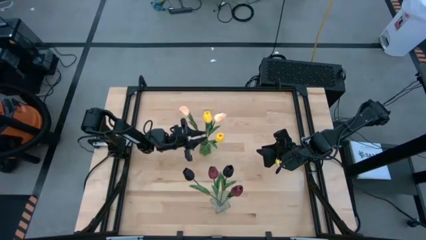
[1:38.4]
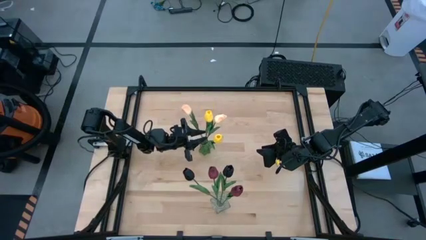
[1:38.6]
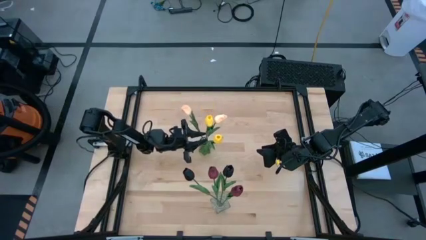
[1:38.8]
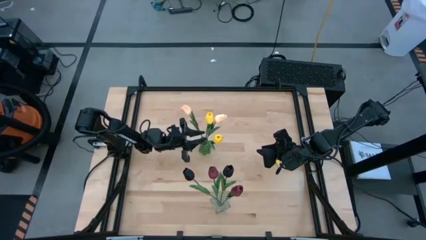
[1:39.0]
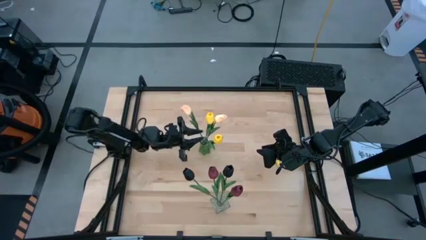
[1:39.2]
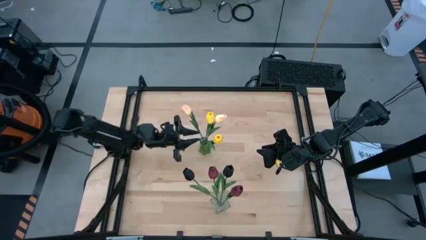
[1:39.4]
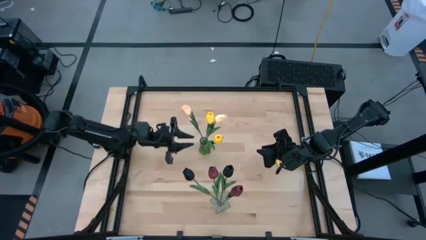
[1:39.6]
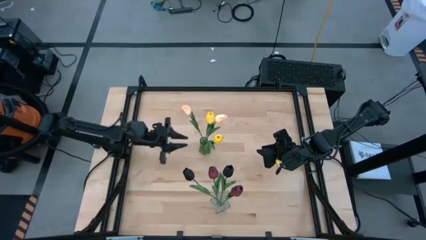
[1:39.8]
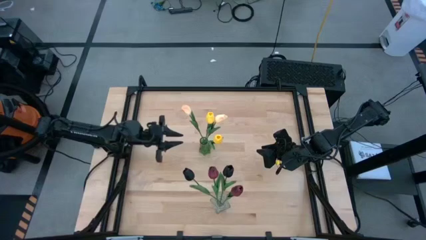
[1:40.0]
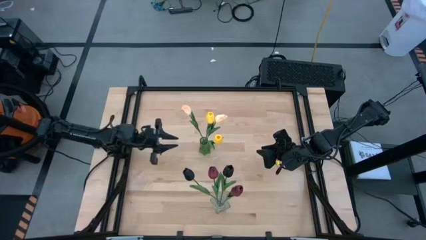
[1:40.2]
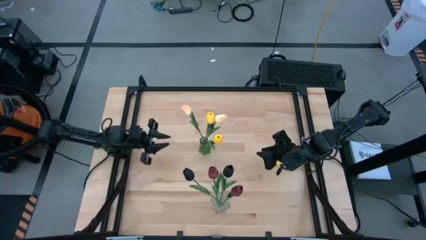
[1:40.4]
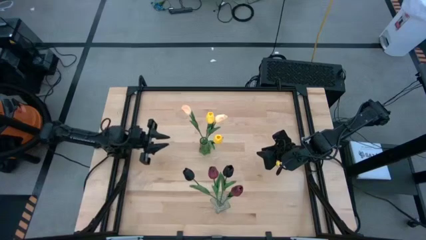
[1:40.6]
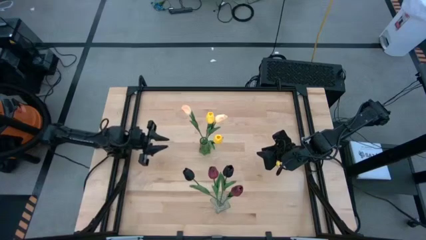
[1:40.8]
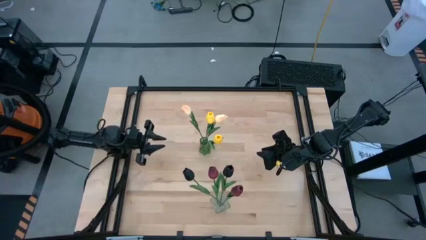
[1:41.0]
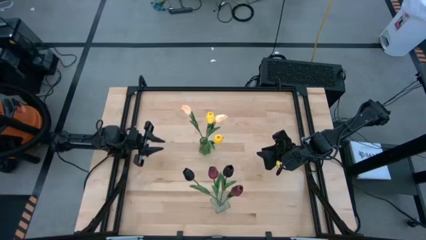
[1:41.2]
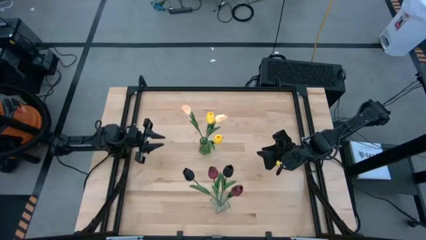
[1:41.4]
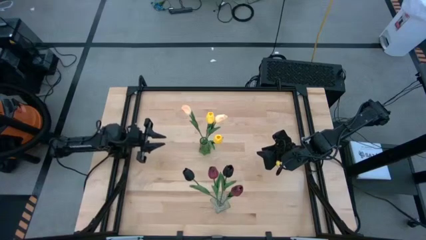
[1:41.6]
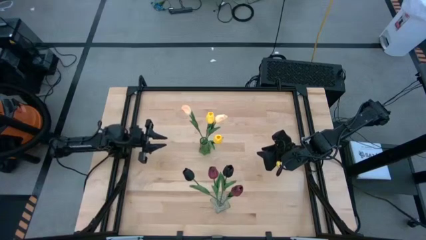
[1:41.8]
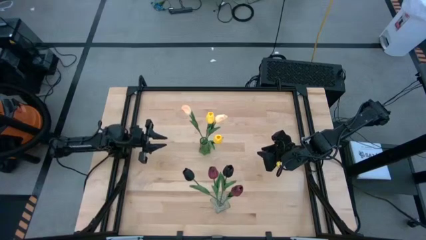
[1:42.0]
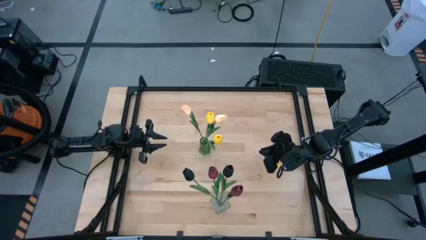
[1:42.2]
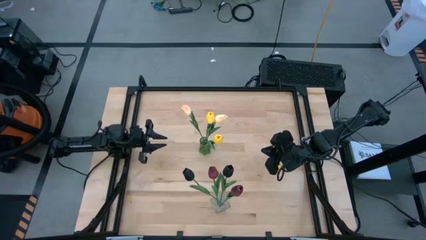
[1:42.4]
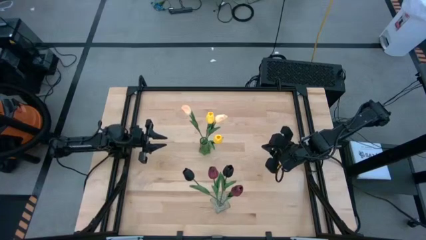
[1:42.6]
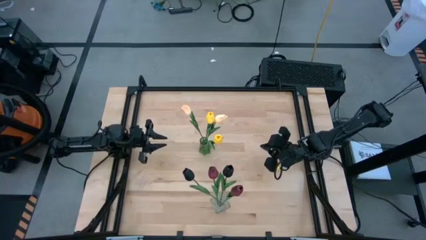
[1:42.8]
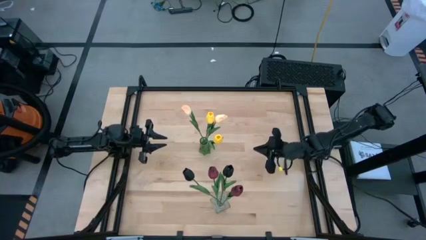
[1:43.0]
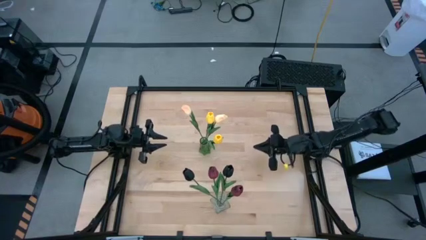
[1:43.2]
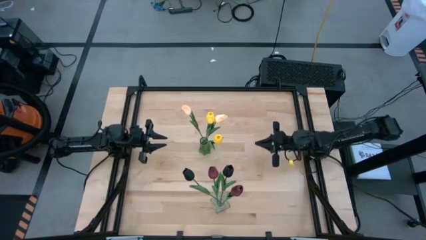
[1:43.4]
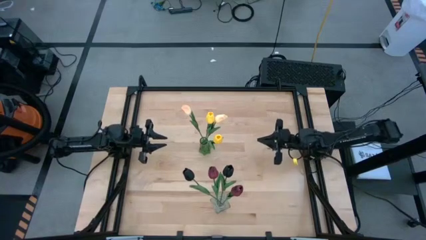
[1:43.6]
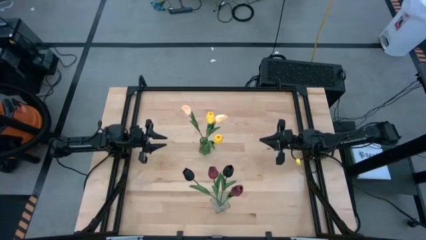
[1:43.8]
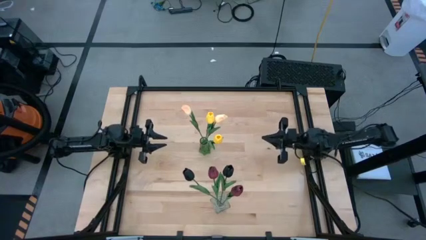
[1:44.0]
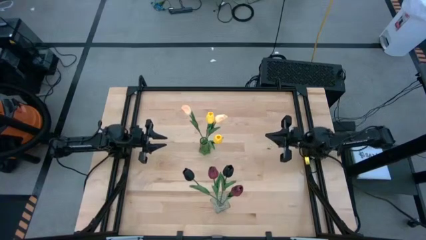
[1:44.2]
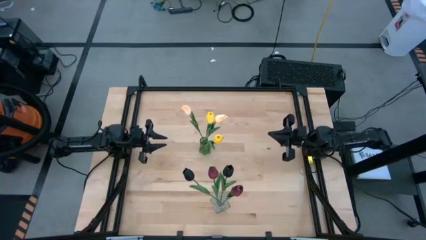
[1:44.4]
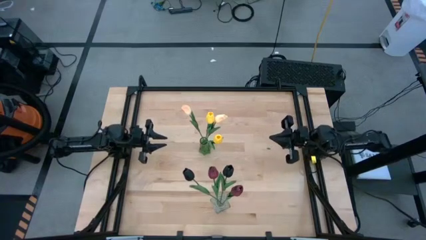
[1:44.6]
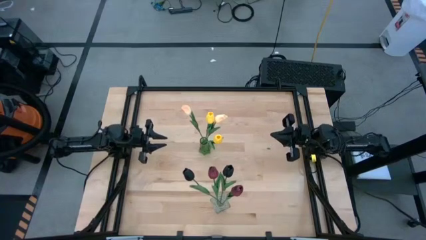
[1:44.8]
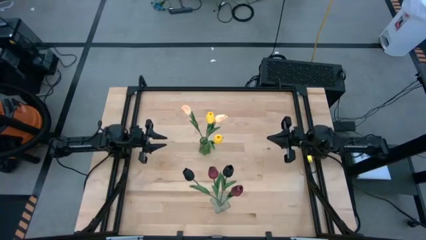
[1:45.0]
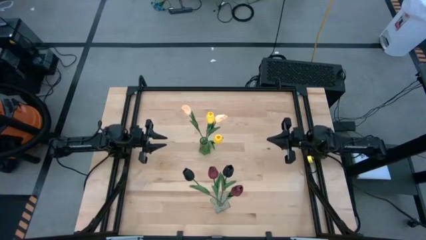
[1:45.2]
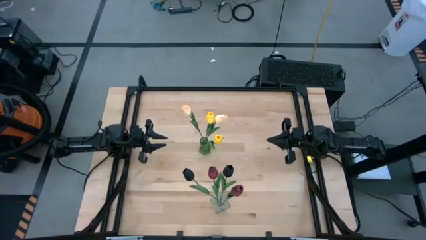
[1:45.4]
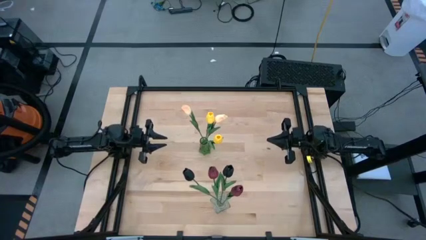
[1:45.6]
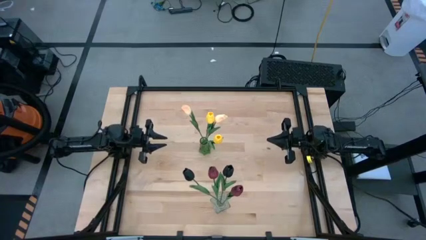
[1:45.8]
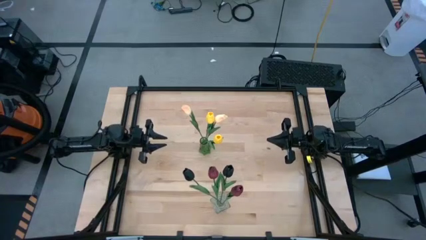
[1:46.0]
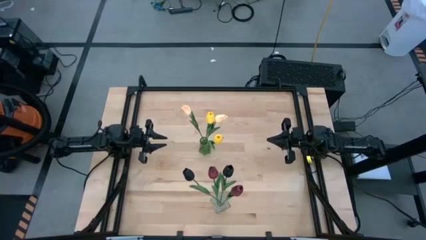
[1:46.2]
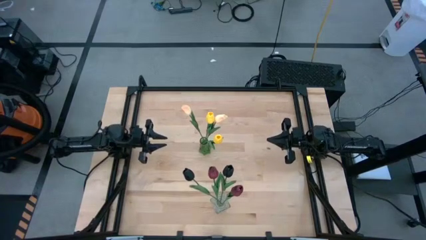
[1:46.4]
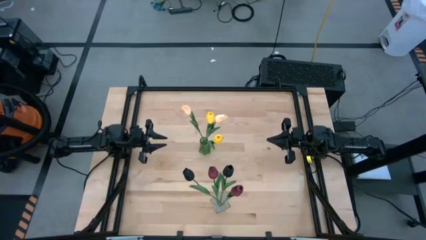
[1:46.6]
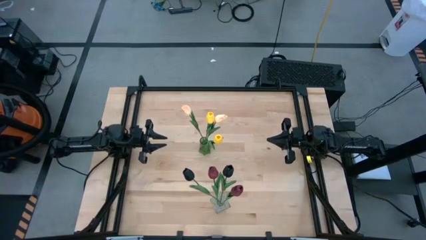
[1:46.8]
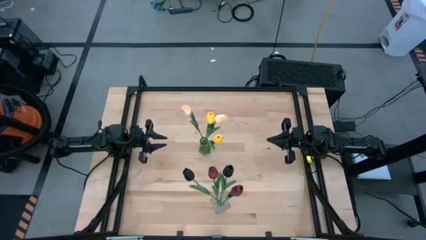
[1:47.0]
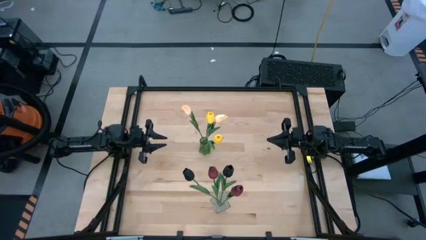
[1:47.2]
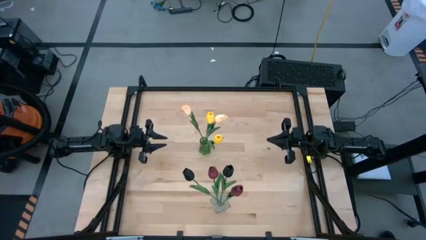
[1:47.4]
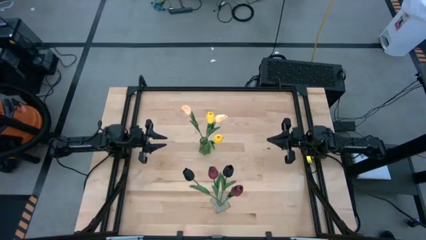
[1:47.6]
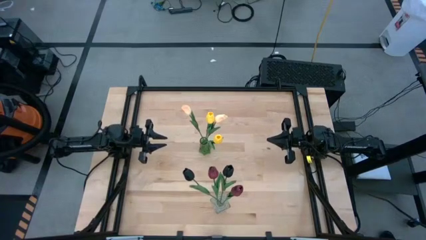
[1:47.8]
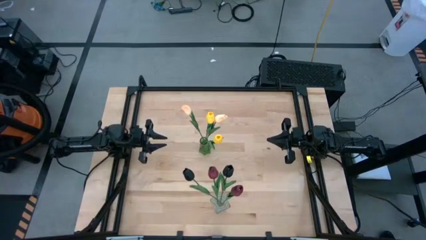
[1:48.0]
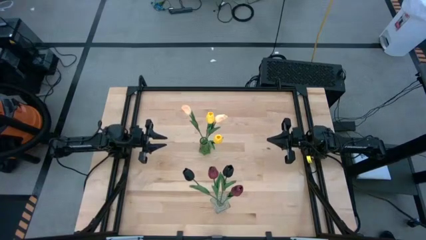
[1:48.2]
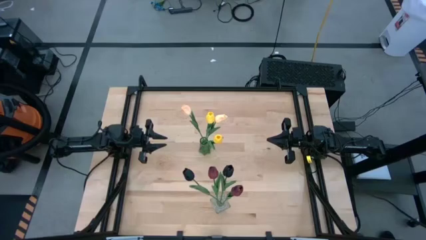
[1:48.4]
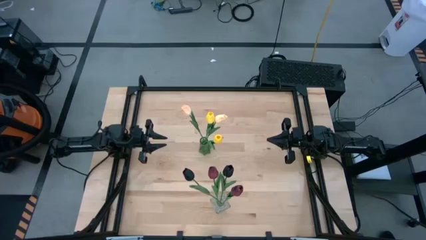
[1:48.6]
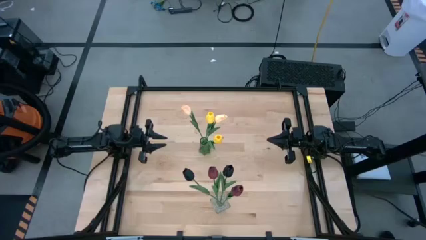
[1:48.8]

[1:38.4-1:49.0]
Task: Sort flowers into vase by color
Return to Home Position

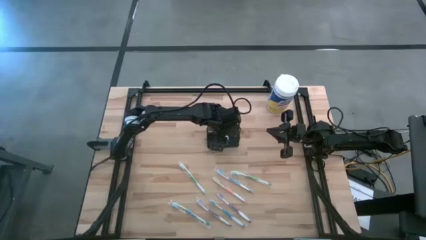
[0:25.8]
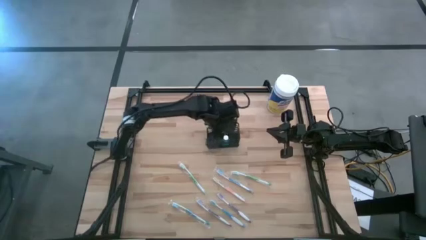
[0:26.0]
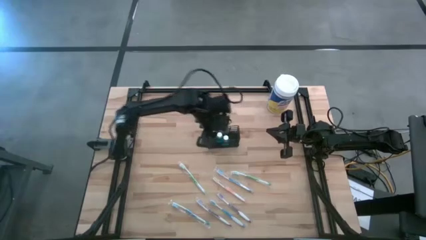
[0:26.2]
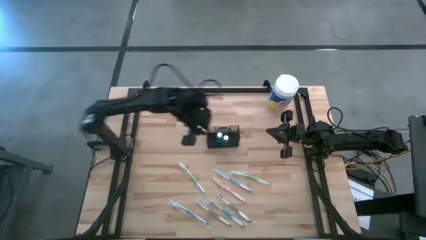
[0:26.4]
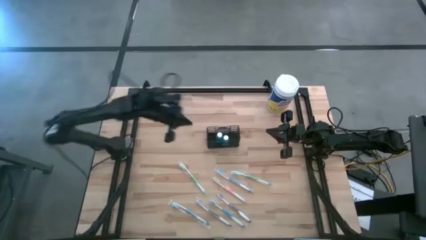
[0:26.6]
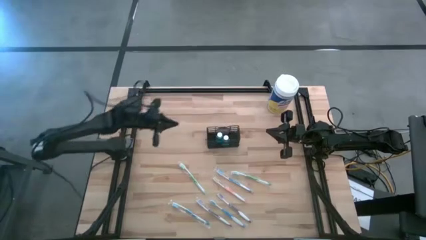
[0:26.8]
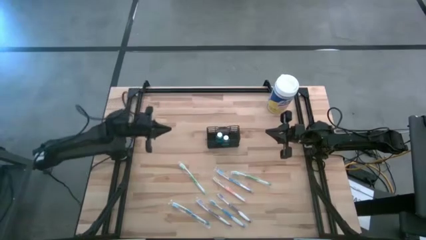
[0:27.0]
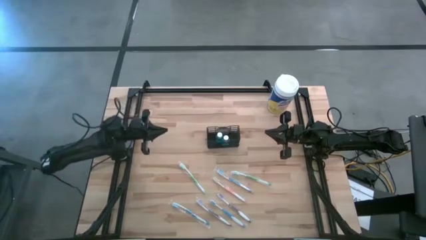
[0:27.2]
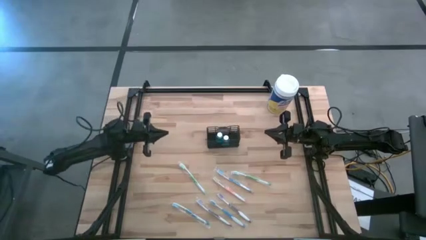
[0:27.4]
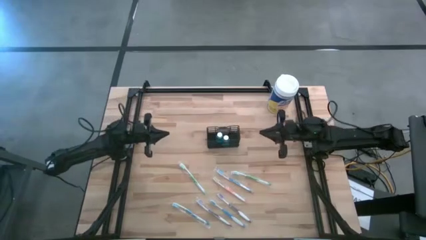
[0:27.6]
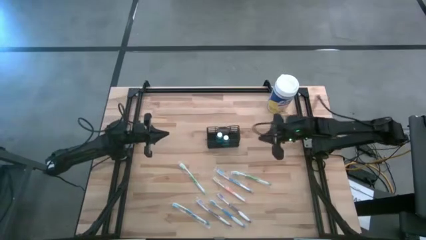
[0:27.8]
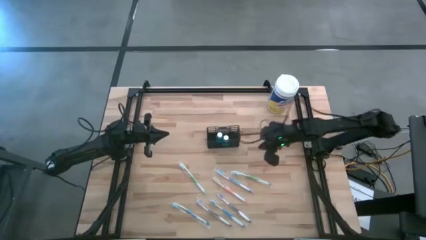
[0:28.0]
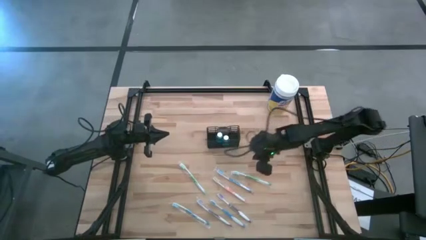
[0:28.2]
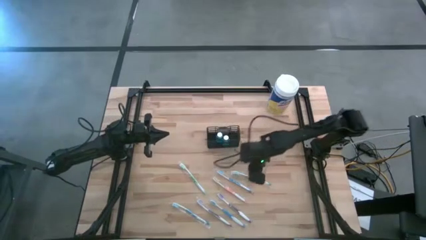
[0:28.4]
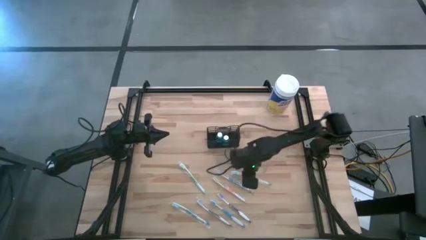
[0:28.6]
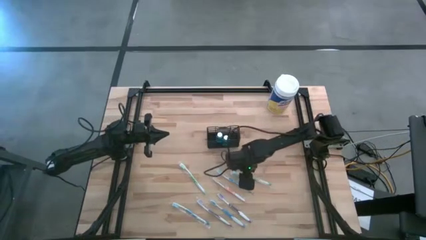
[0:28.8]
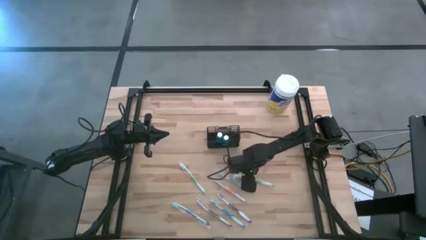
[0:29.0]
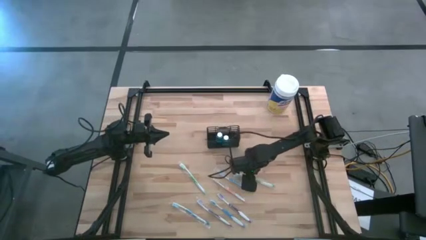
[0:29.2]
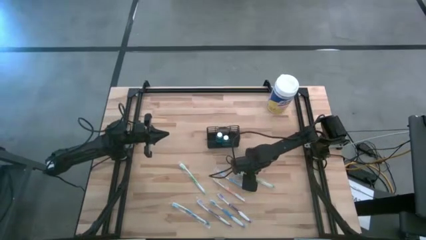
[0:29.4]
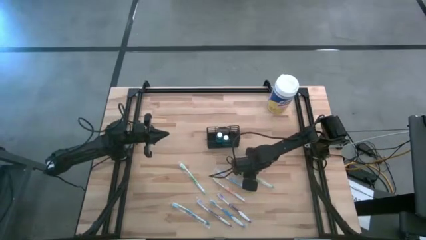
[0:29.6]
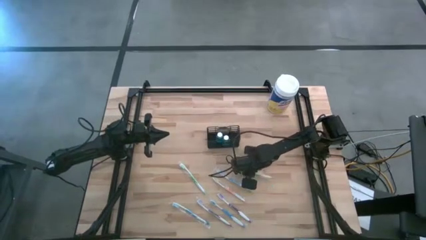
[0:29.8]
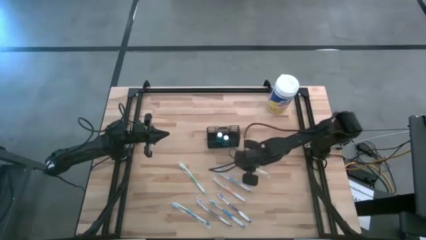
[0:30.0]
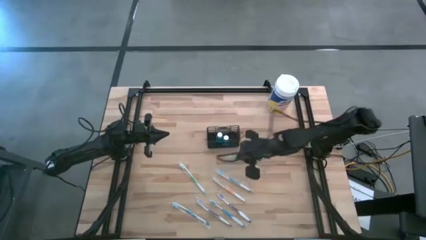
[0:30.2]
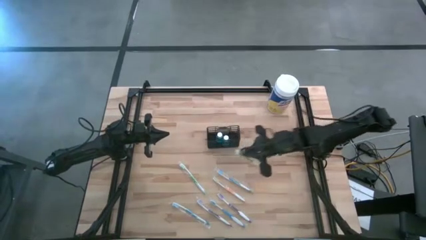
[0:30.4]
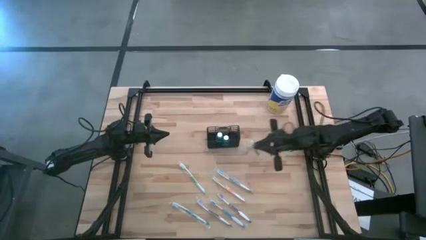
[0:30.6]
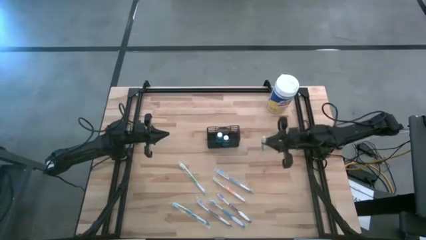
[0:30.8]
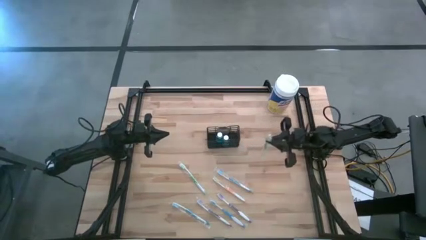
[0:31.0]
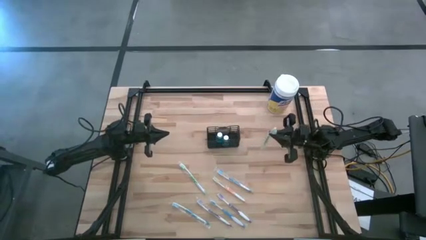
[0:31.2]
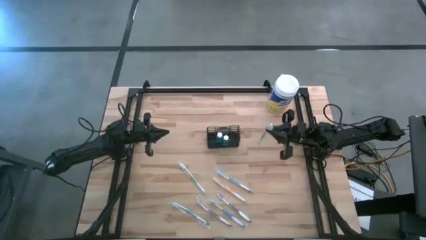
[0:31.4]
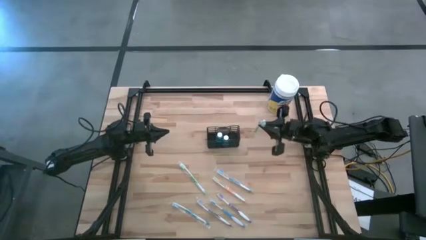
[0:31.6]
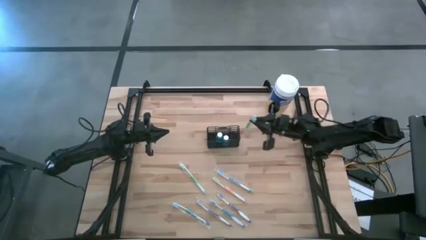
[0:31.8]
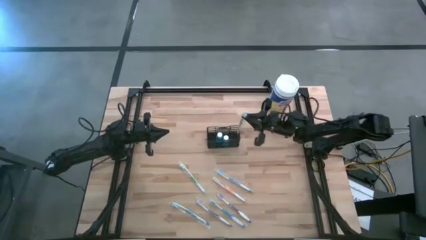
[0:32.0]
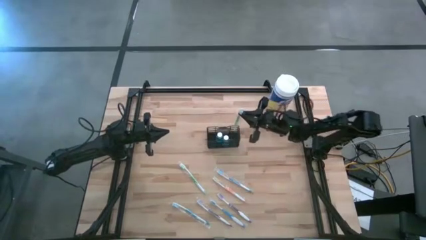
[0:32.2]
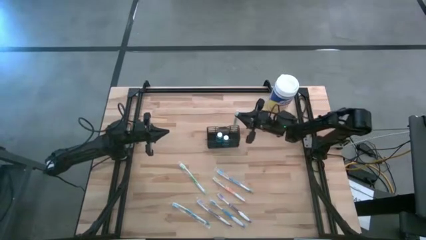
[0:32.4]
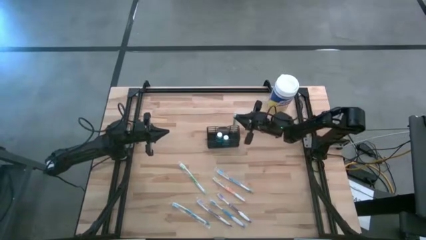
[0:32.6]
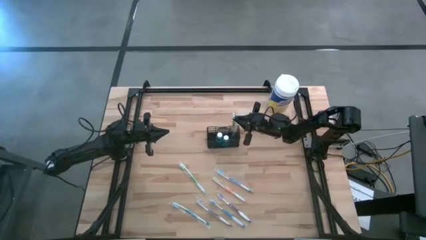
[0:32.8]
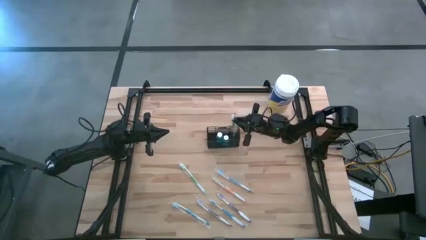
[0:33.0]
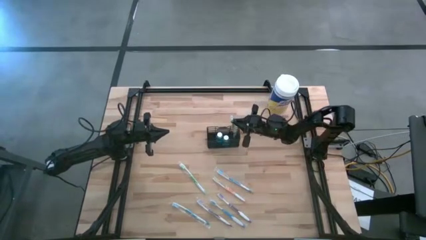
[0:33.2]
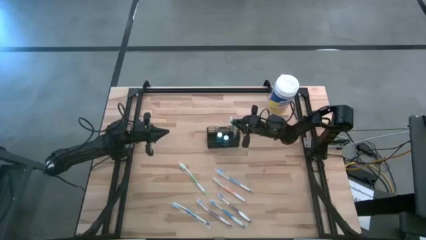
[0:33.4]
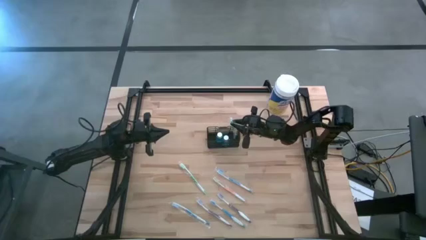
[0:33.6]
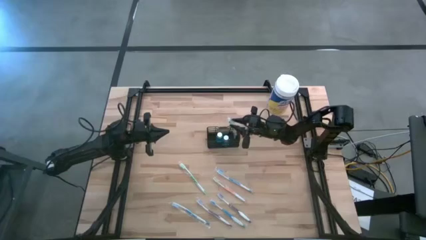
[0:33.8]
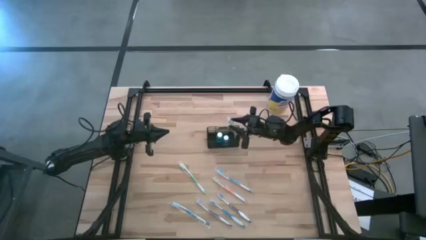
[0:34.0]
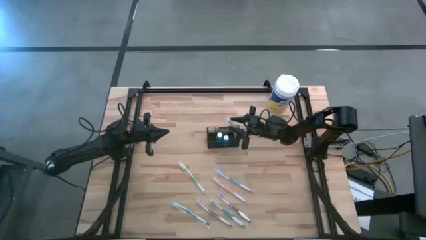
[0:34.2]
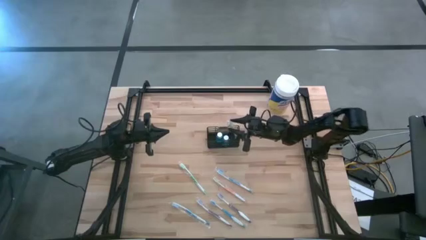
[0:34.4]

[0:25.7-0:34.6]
Task: Pick & Place toothbrushing station
Put the right green toothbrush into the wire organizer
